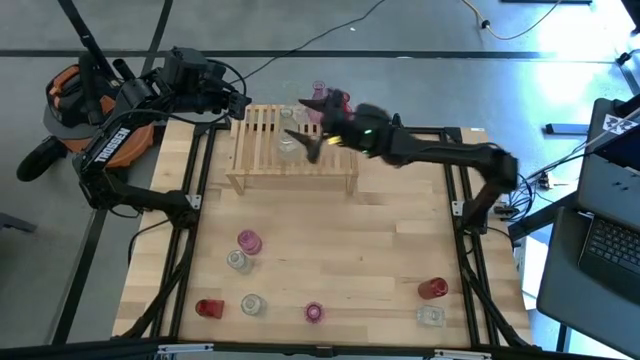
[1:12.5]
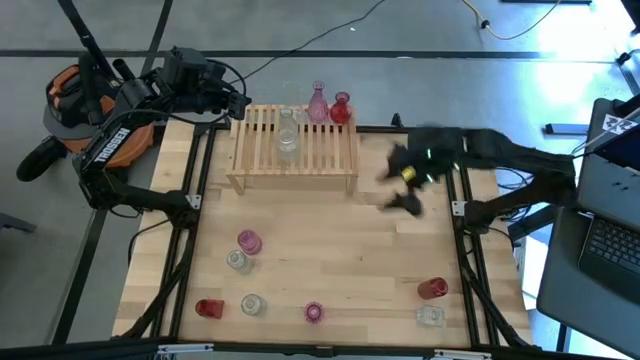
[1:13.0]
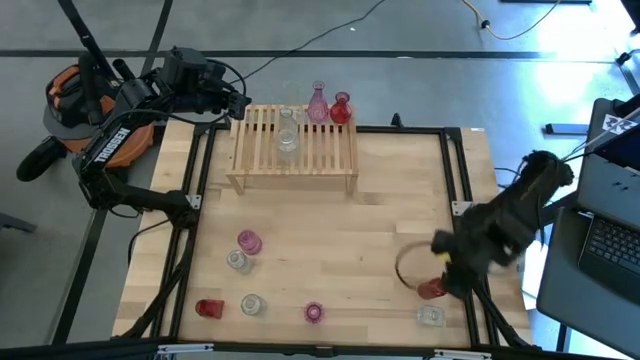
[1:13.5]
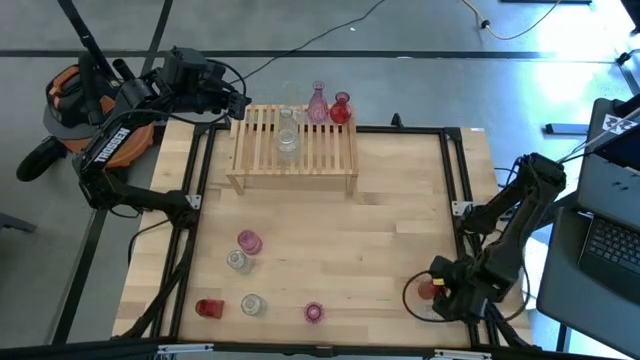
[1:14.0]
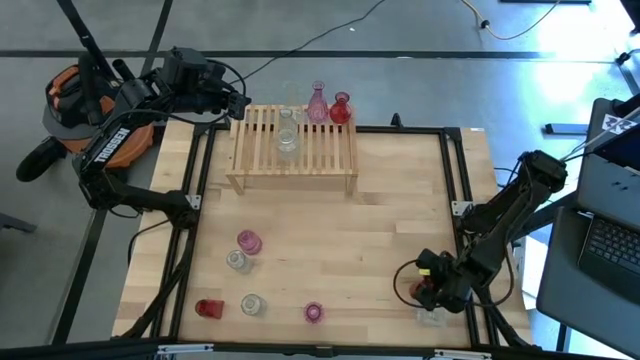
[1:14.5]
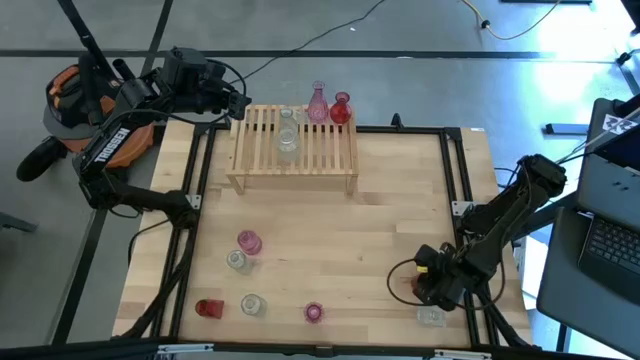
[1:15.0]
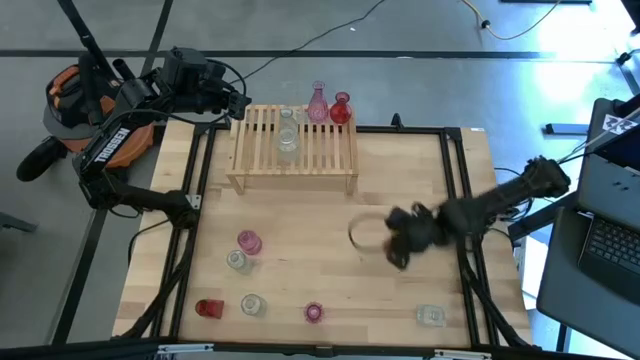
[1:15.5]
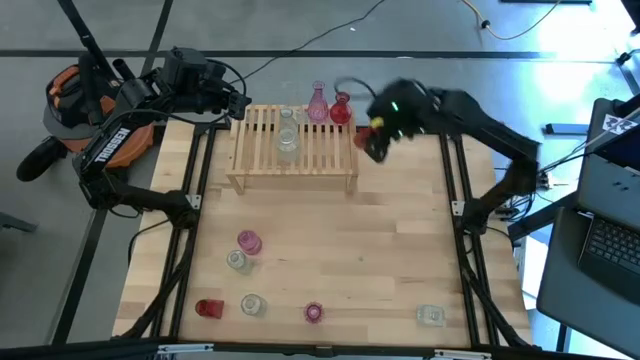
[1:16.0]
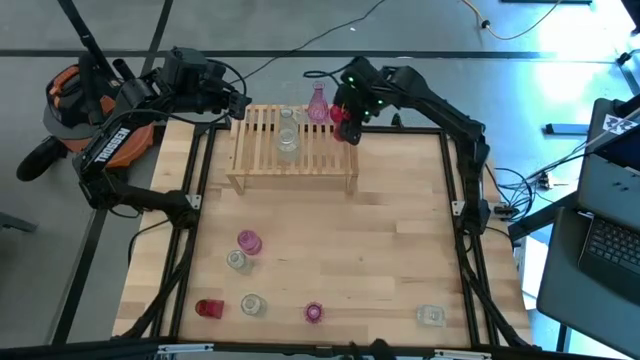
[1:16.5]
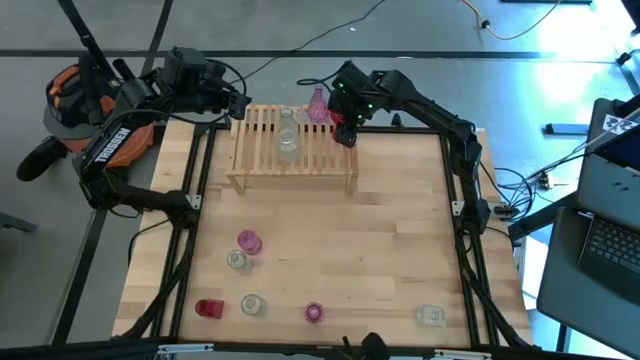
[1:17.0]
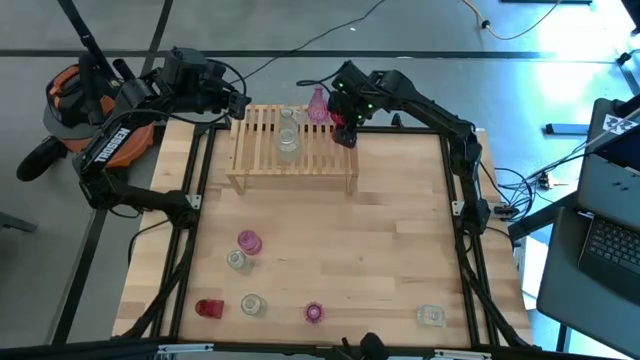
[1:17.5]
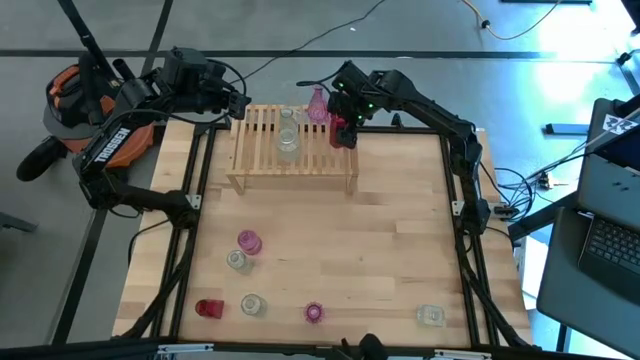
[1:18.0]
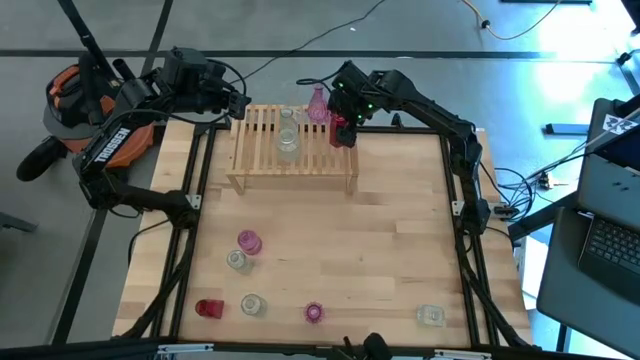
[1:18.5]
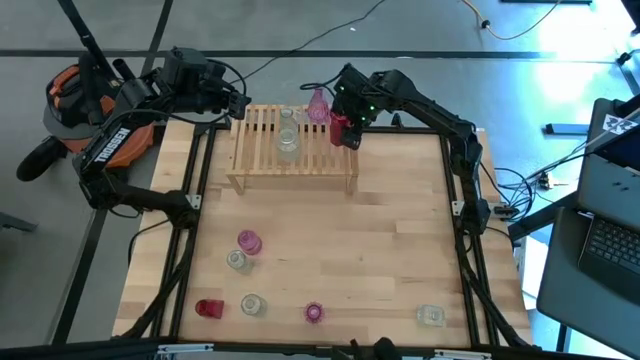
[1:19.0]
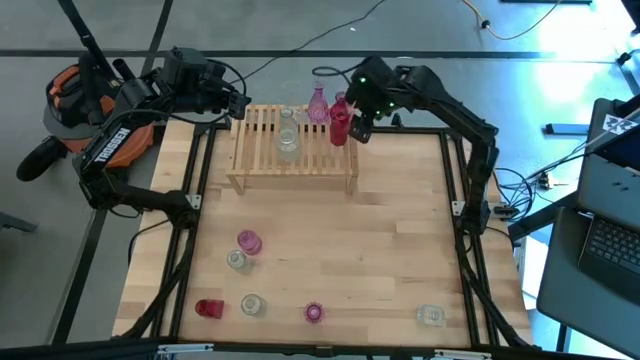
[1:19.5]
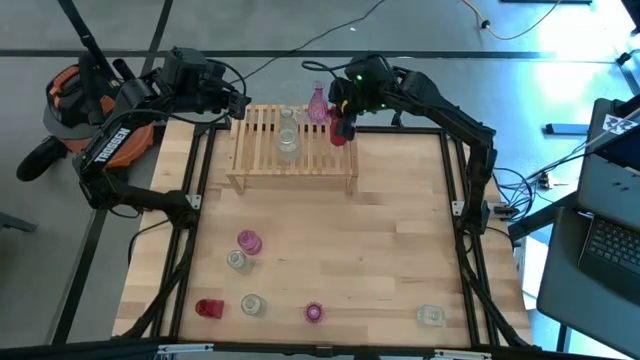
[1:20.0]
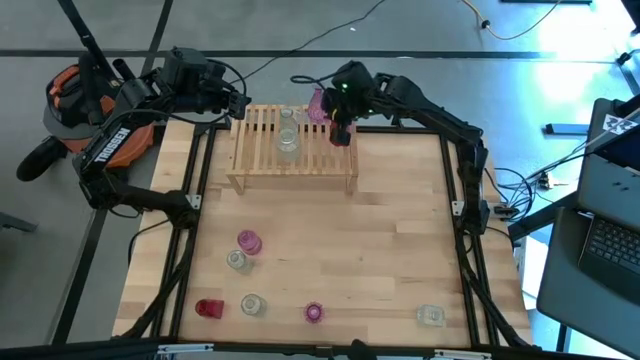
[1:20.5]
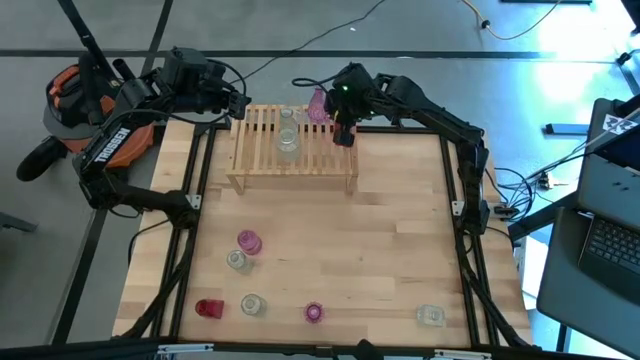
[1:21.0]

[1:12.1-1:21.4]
Task: sort vases onto shelf
Put the red vase on the shelf aligned with the other red vase

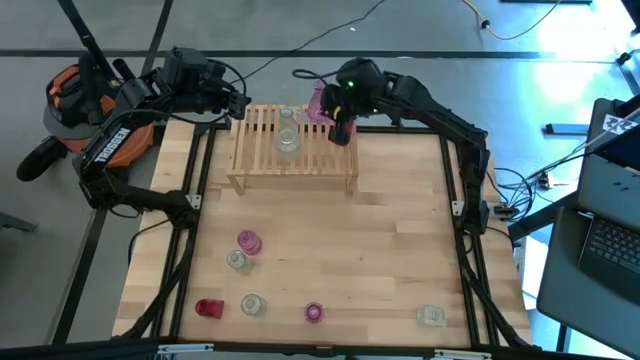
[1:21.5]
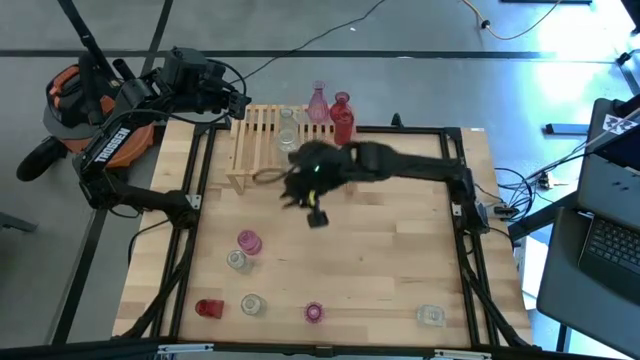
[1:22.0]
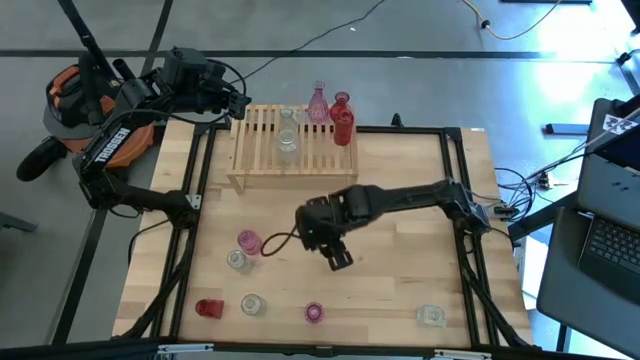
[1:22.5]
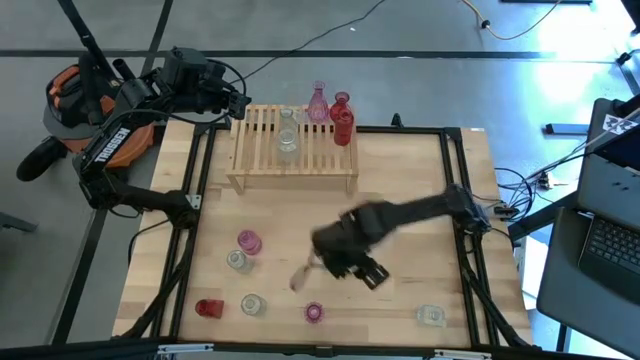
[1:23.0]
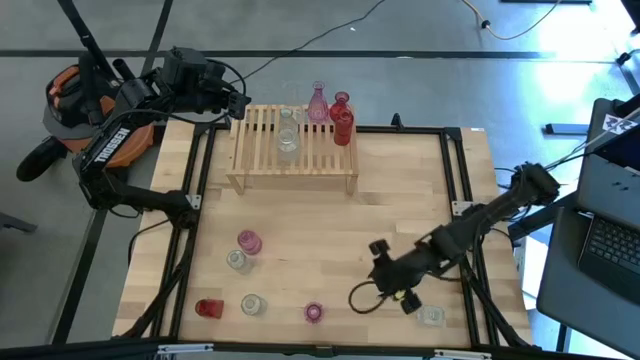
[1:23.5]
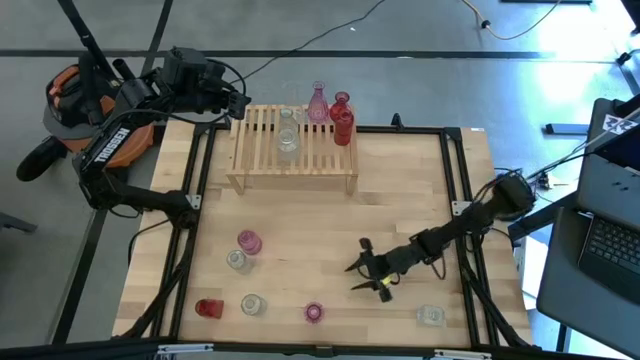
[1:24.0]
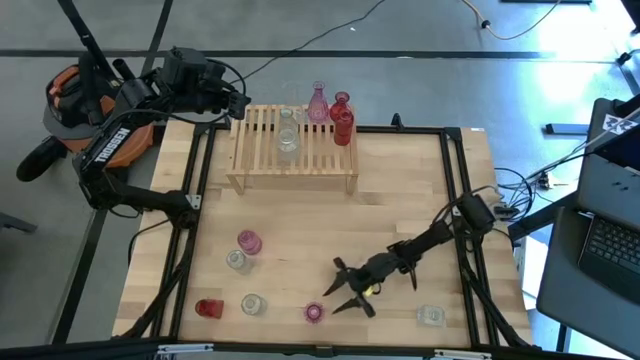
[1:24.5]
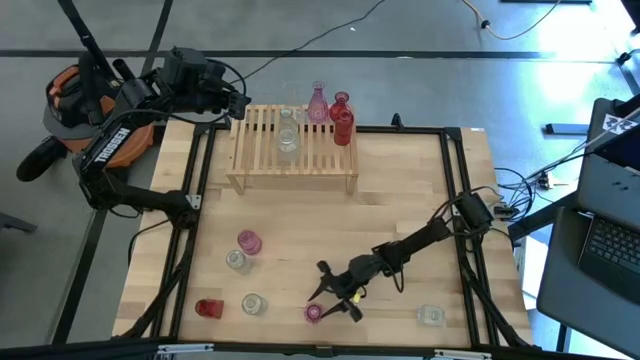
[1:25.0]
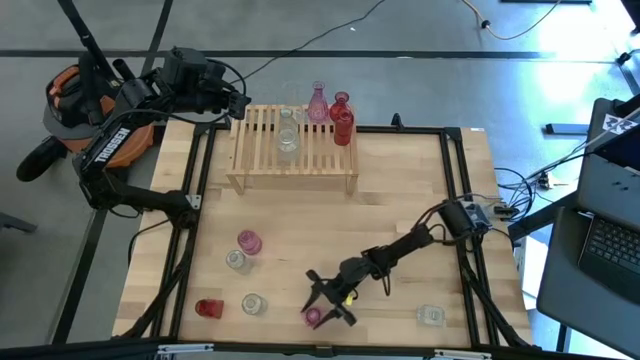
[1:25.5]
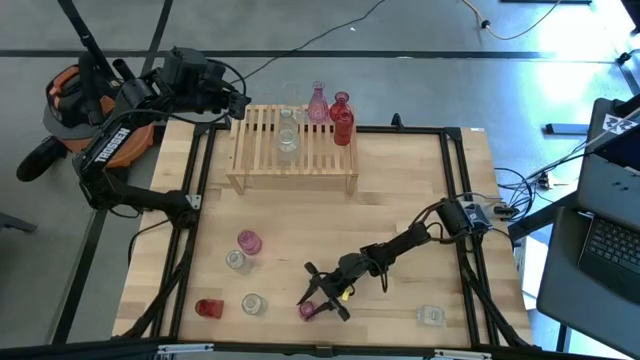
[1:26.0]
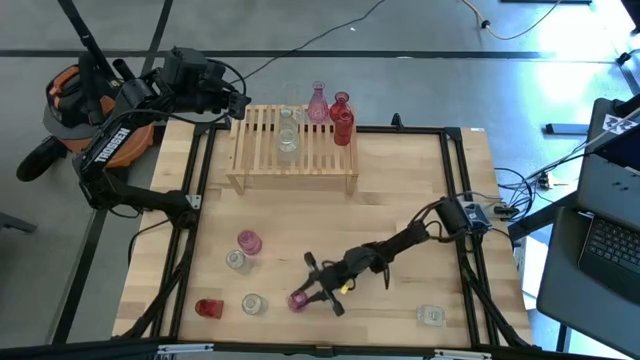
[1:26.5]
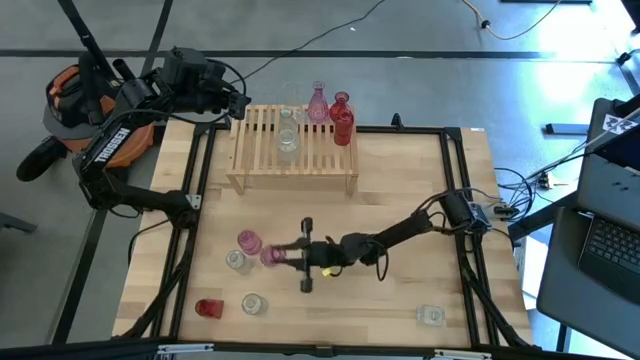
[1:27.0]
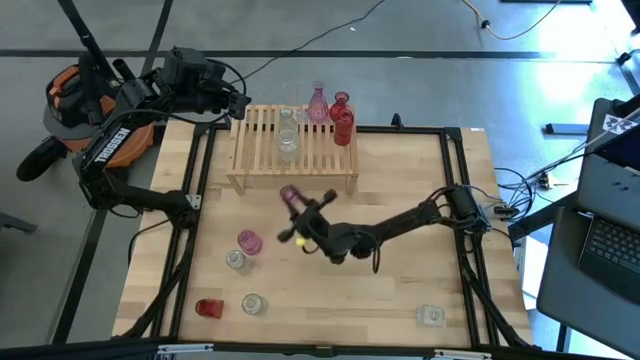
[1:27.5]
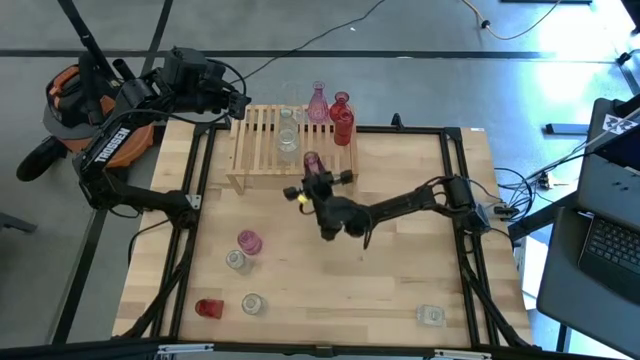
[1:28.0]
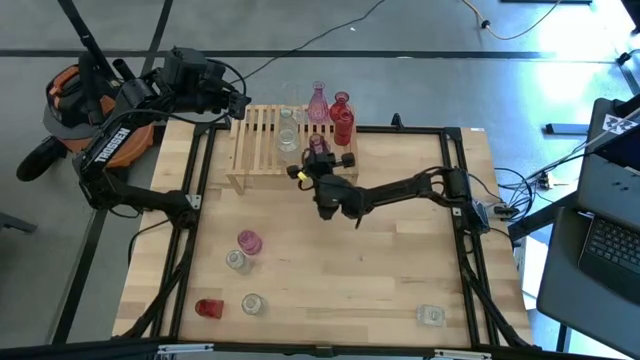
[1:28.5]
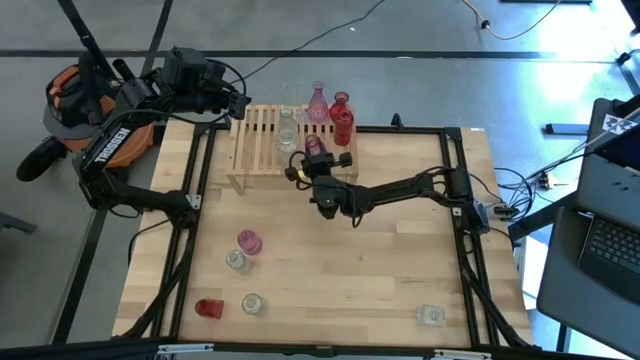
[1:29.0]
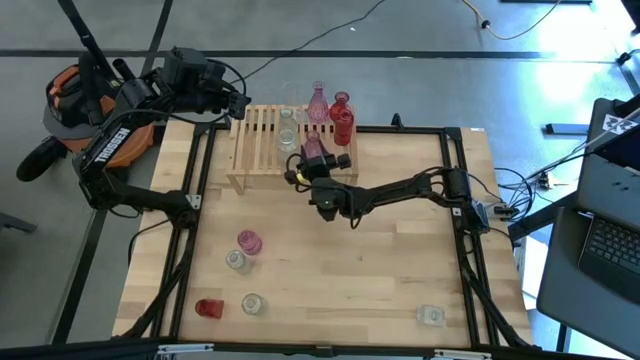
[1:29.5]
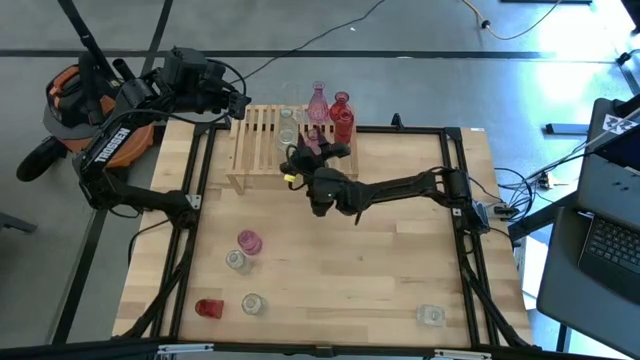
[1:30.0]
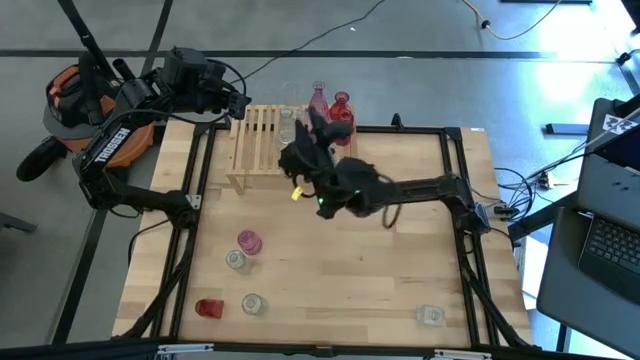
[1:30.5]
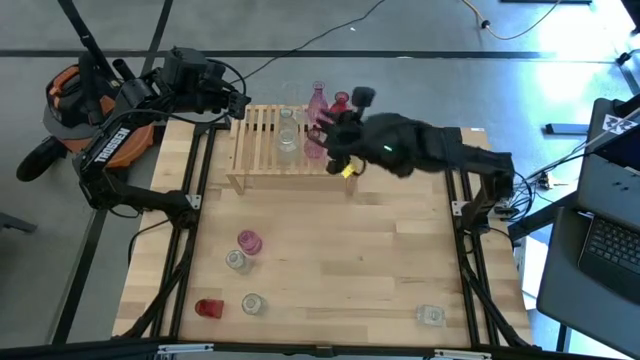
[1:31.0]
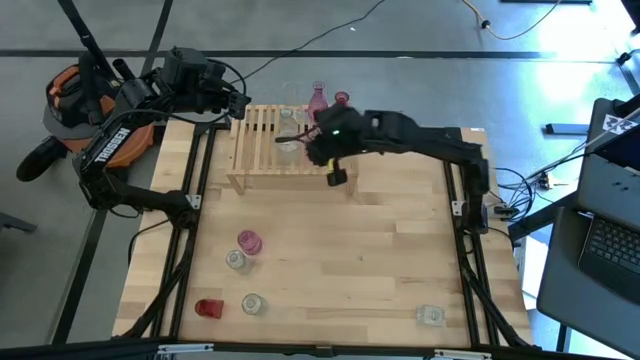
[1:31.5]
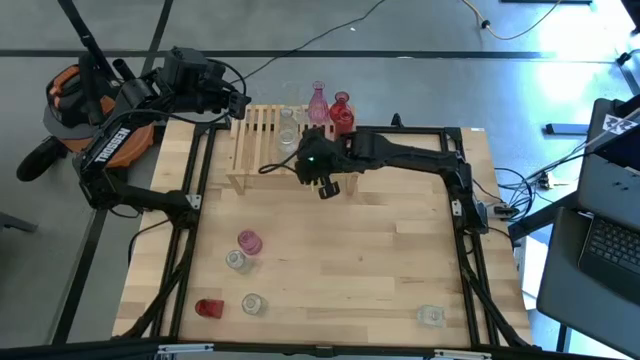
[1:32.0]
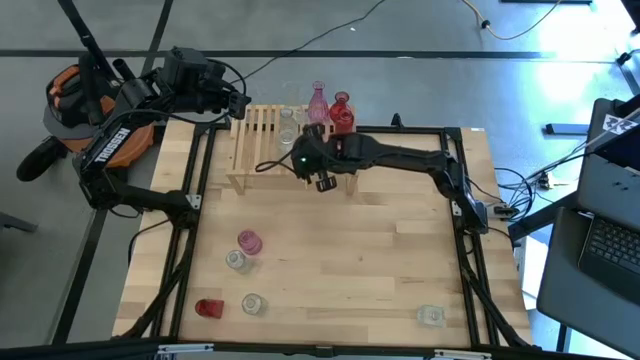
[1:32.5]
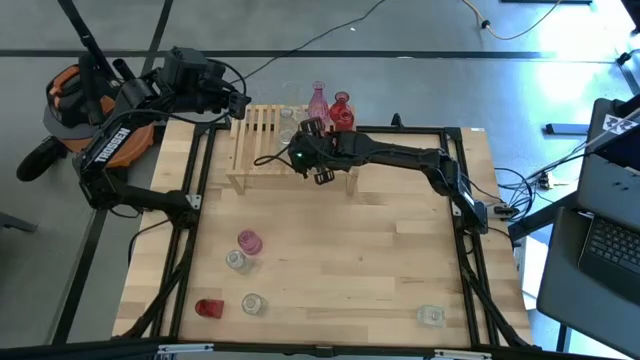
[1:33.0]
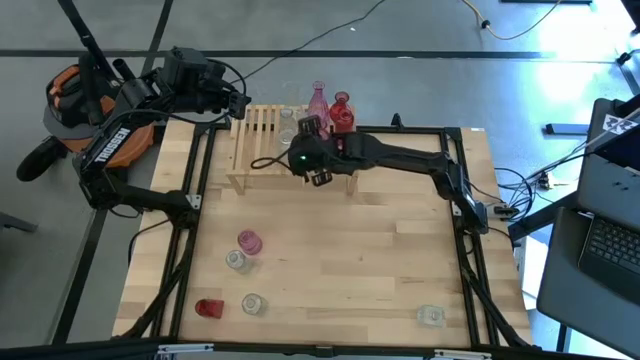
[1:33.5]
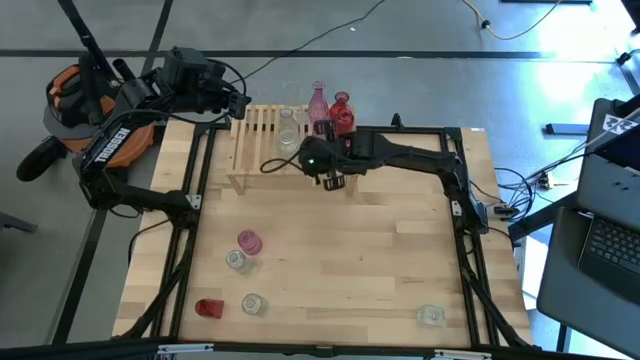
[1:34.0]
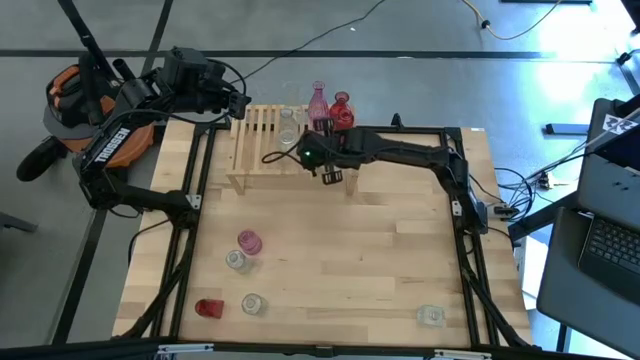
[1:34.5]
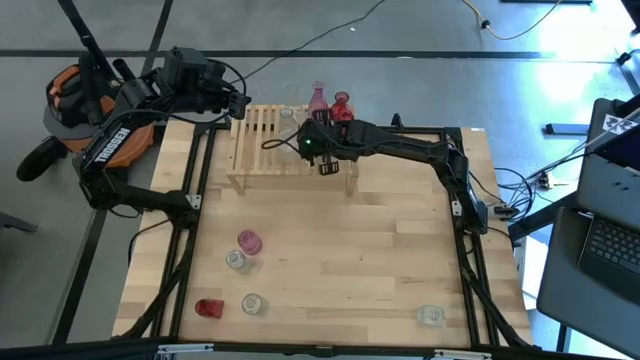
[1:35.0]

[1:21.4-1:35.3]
Put the pink vase on the shelf aligned with the other pink vase
